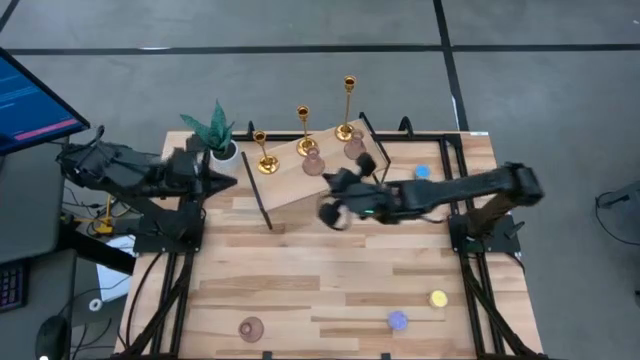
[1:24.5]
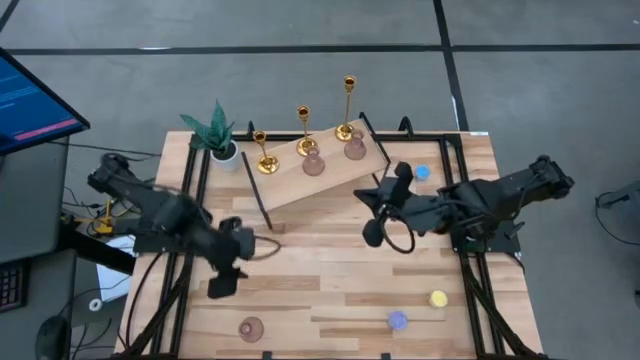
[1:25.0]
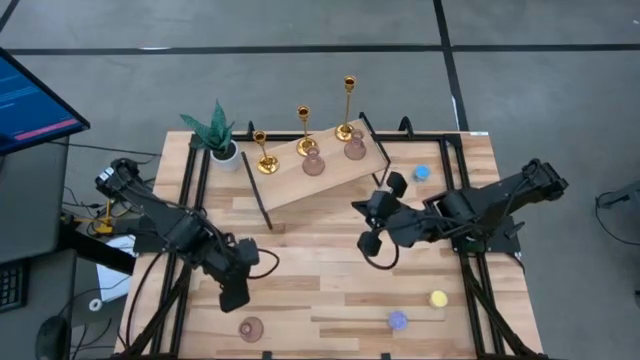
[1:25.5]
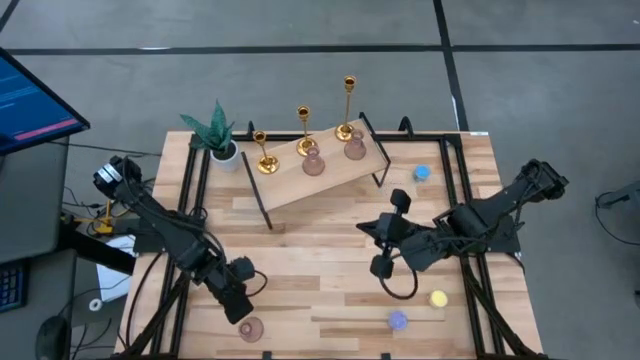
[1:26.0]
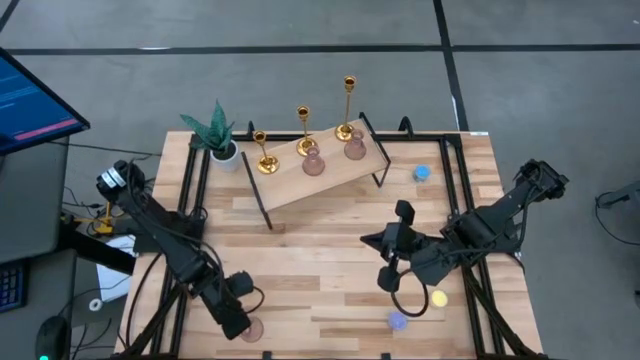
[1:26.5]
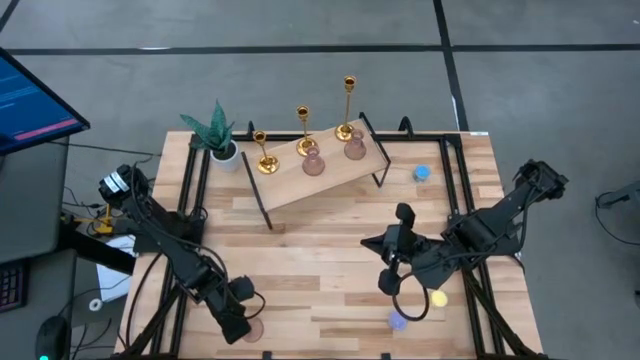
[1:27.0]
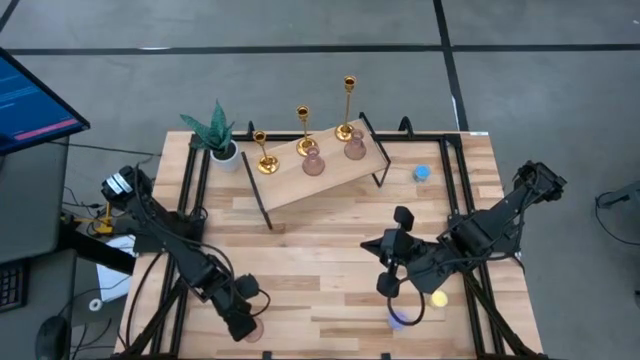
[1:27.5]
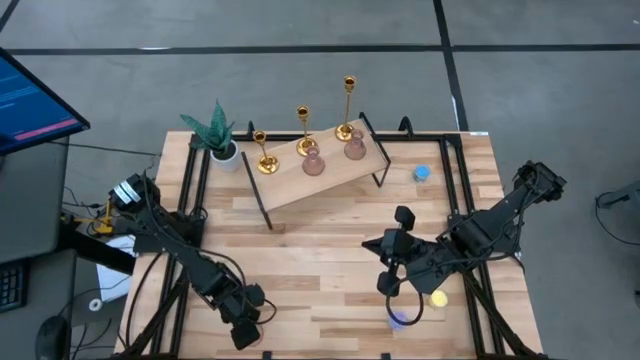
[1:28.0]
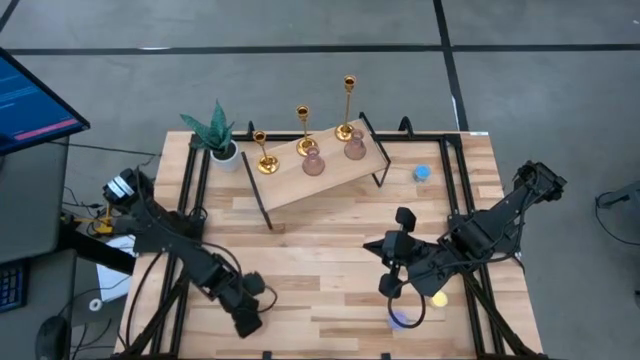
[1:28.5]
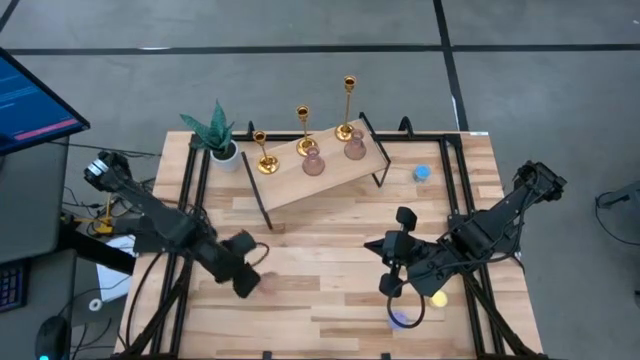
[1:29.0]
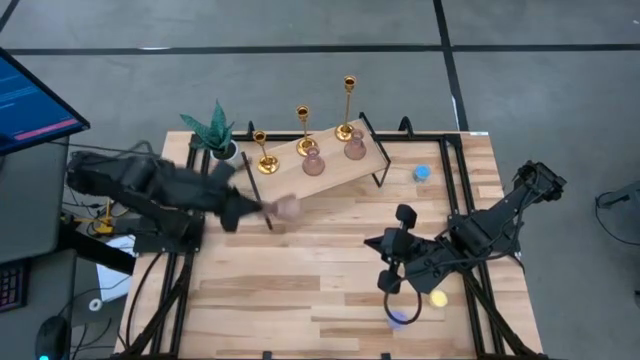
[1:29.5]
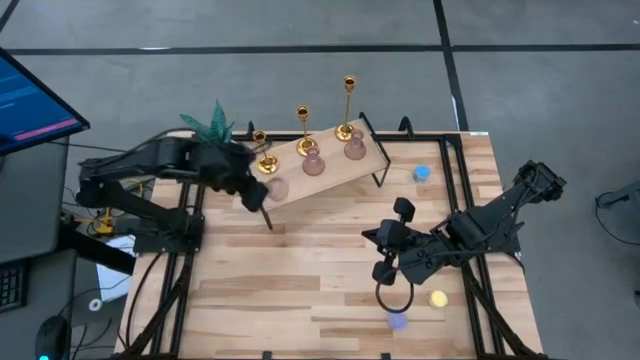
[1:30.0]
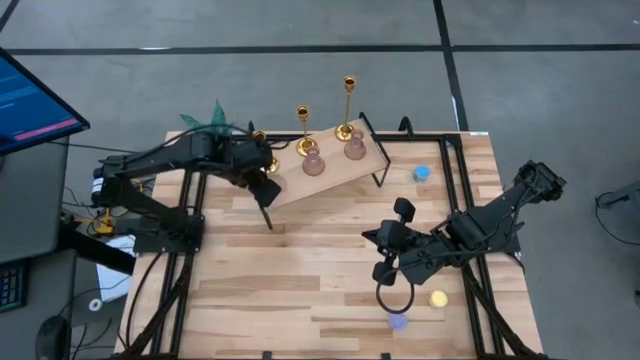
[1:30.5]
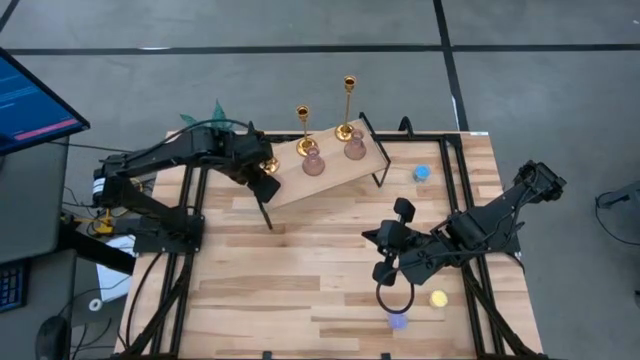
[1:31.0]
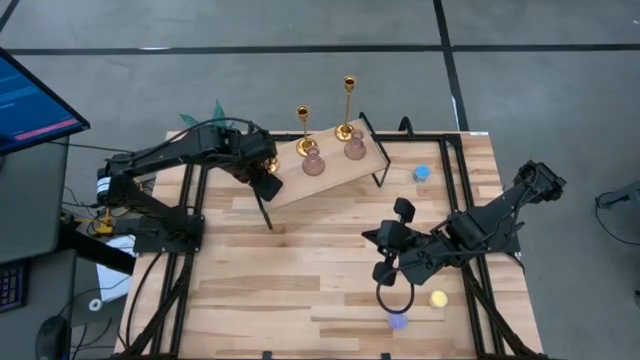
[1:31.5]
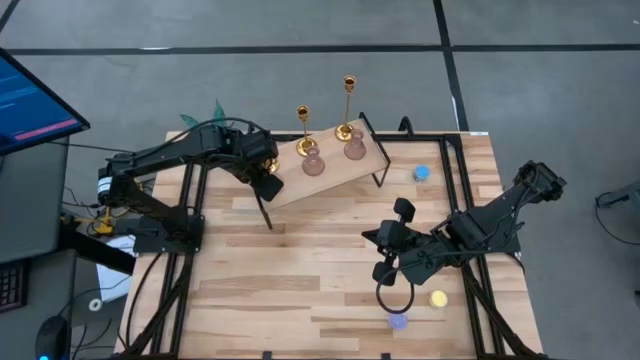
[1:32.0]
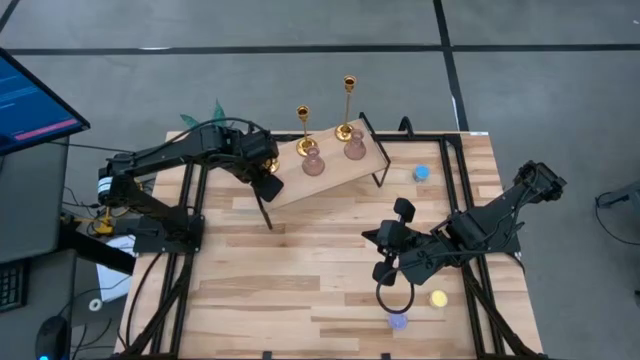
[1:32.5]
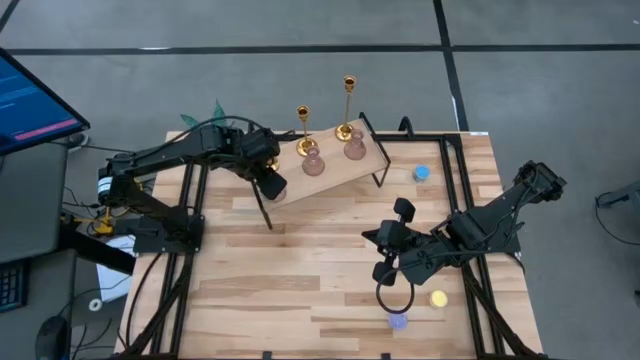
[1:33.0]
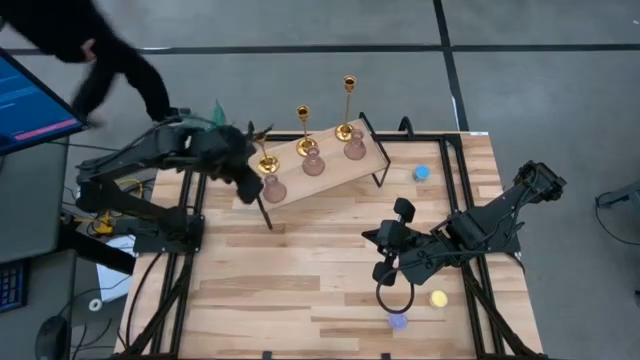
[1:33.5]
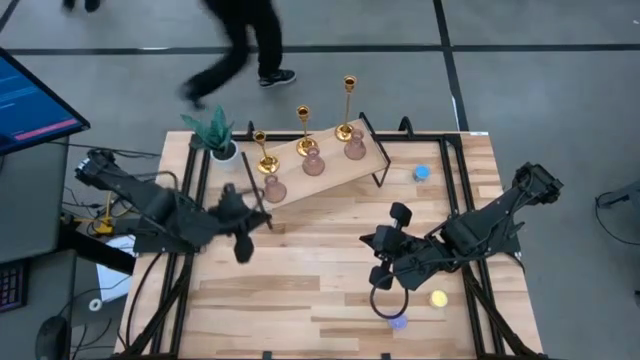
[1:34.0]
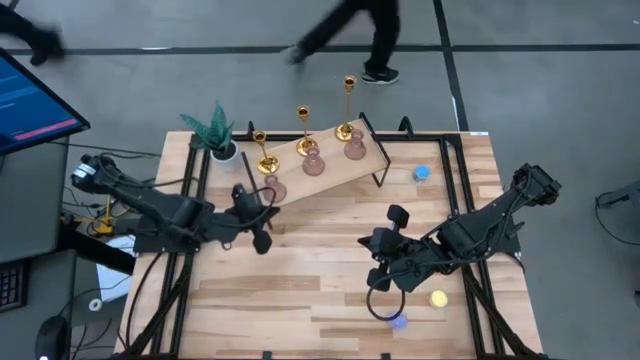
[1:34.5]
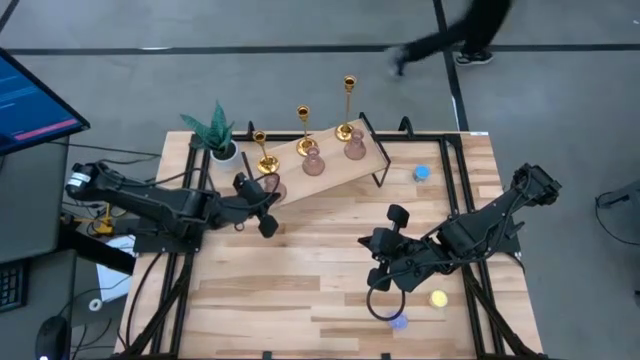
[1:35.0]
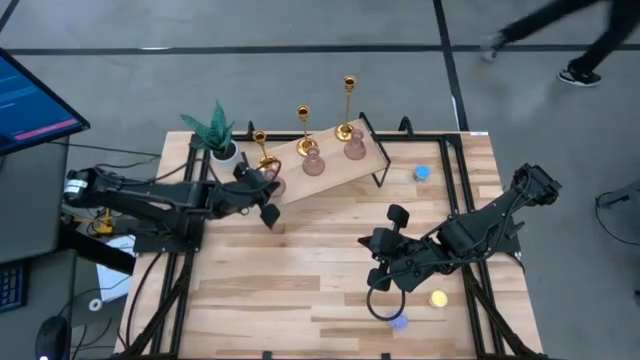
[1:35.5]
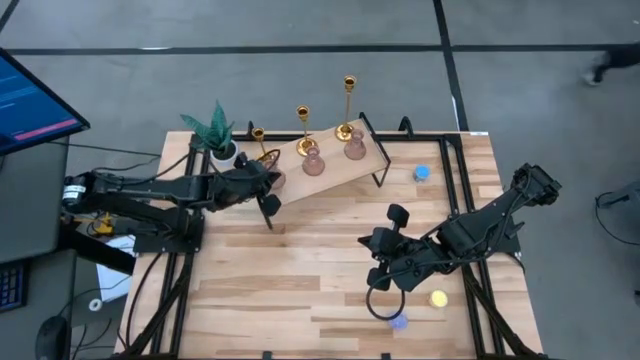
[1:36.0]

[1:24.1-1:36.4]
Task: Pick & Place candle stick holders
Put the pink glass candle holder on the shelf

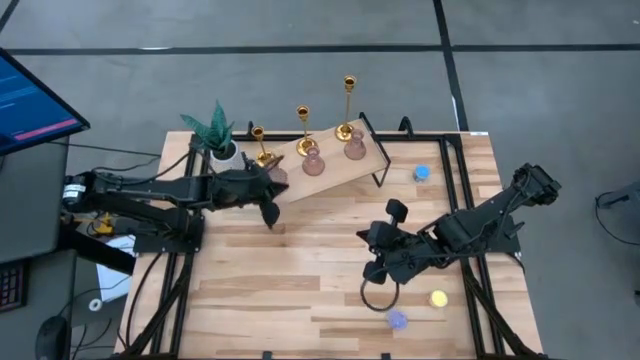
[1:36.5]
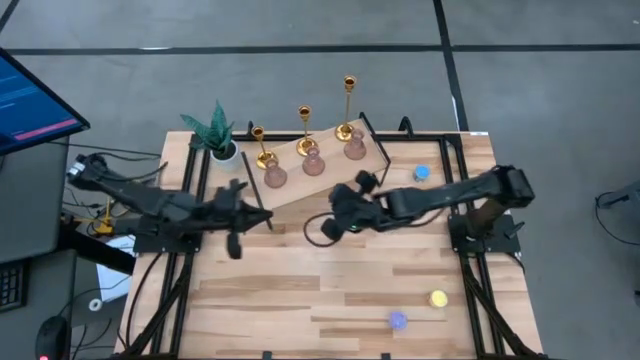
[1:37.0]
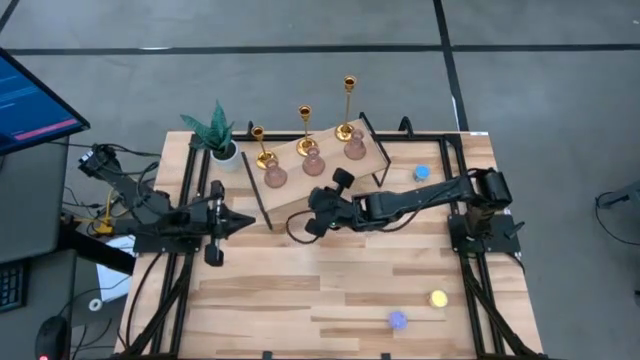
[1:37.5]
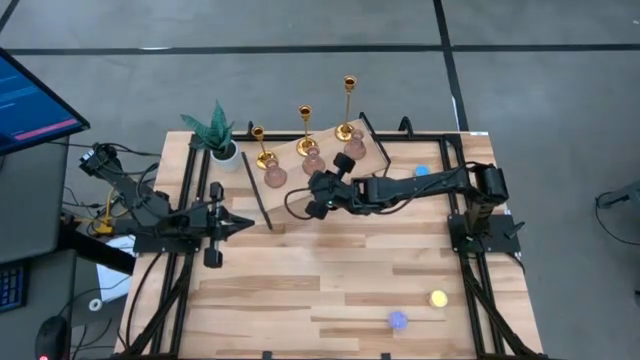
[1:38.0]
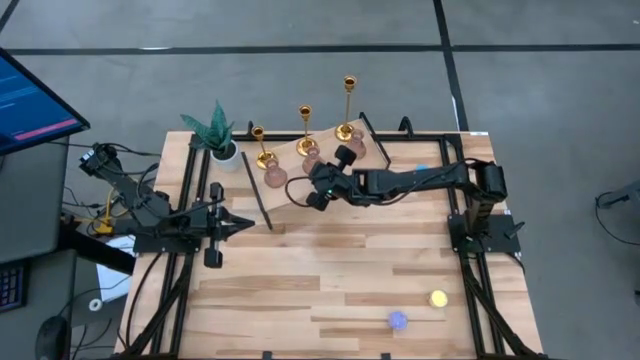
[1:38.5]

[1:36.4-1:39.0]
Adjust the pink glass candle holder on the shelf

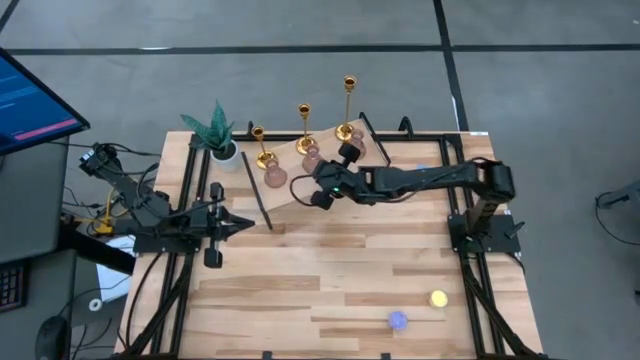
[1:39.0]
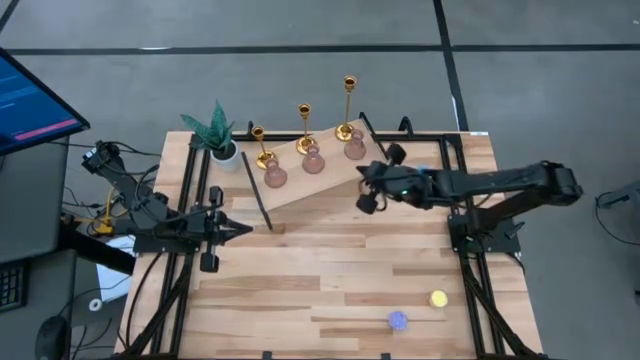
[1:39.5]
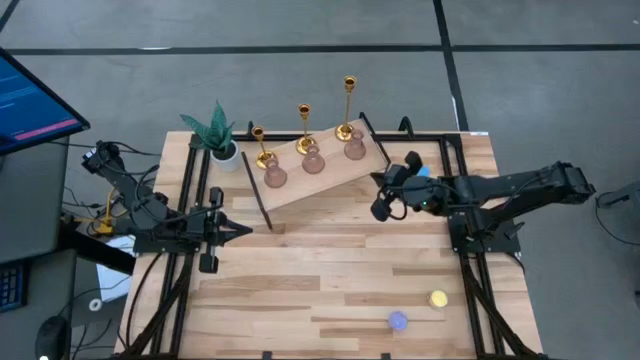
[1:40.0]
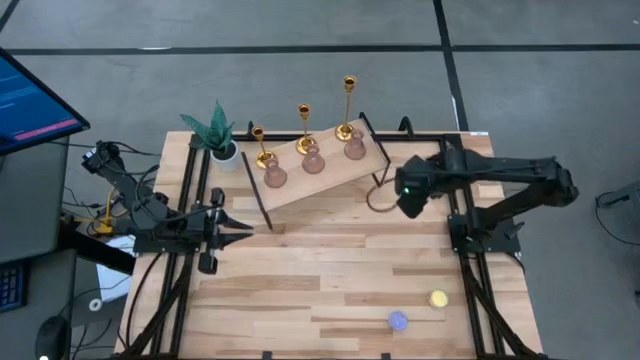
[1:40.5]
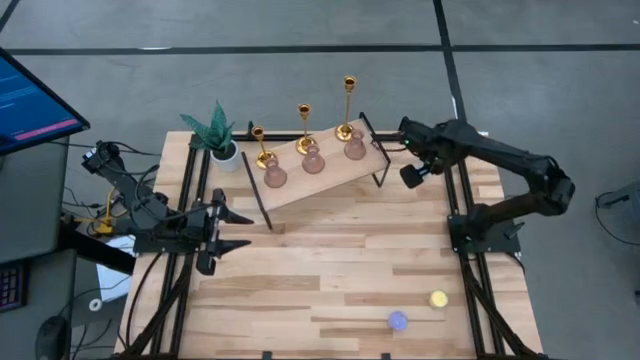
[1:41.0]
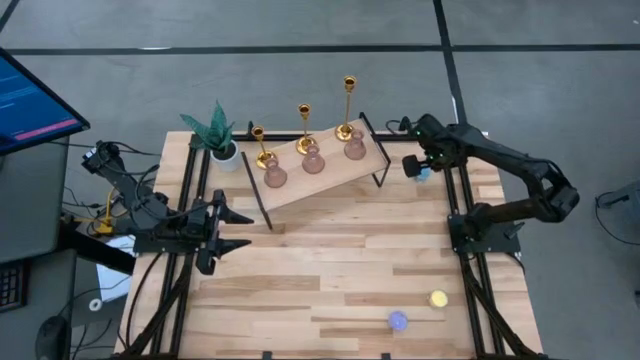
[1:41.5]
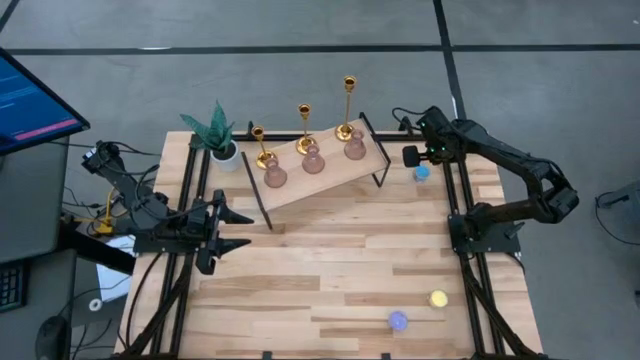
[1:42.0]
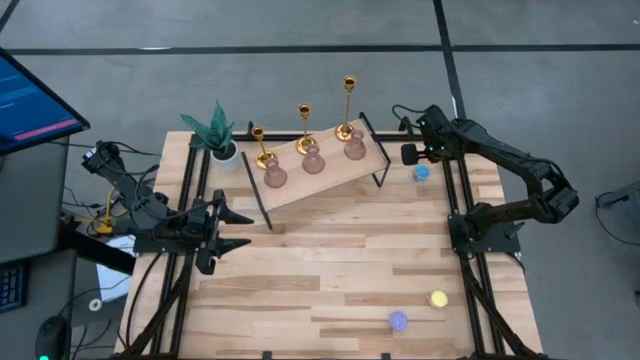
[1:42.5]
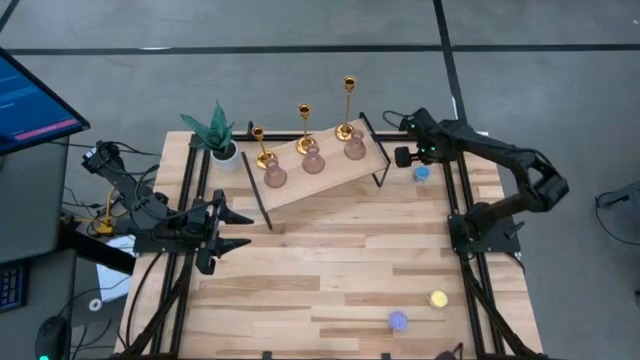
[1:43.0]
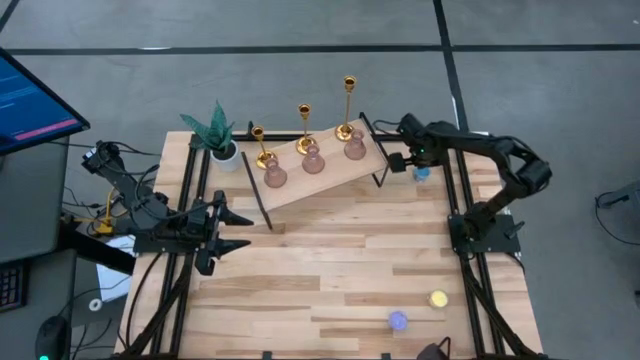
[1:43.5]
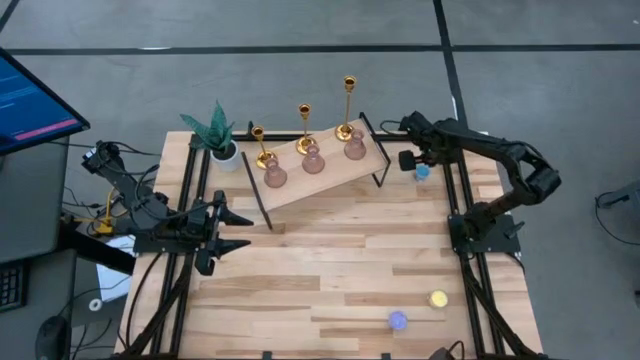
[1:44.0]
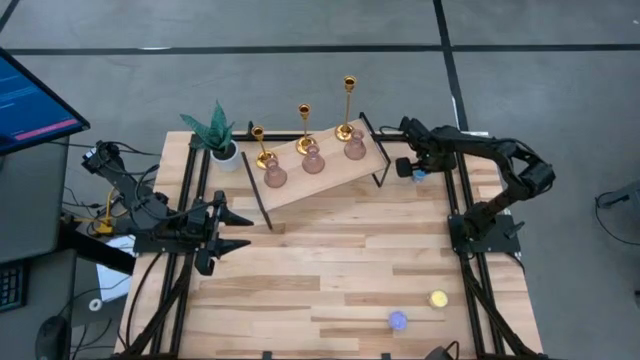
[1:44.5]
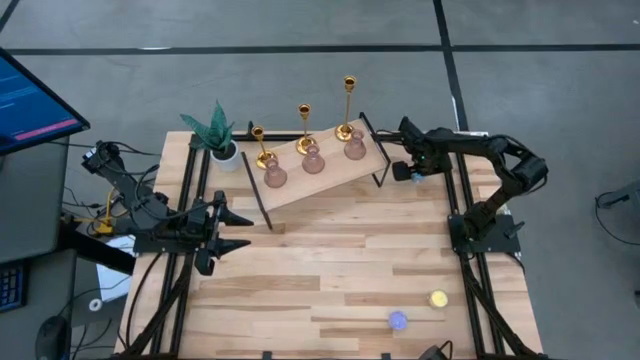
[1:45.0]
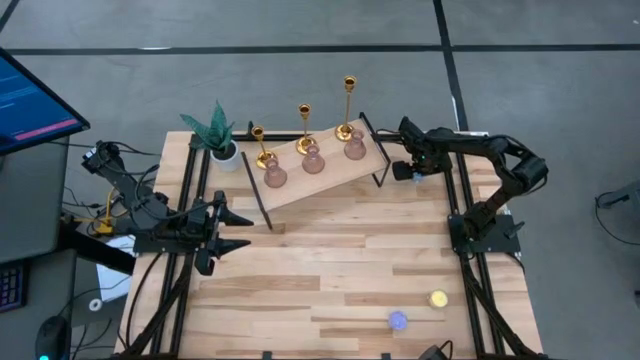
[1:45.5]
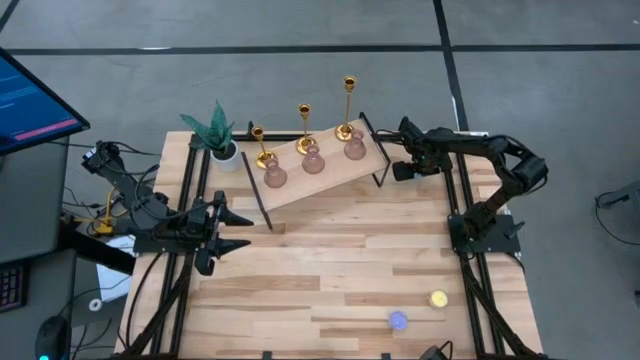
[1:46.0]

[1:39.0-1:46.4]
Put the blue scented candle on the shelf
